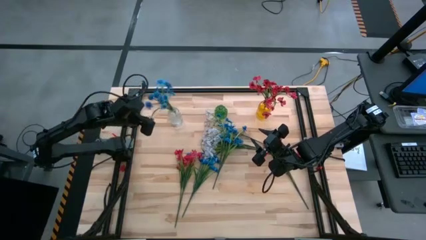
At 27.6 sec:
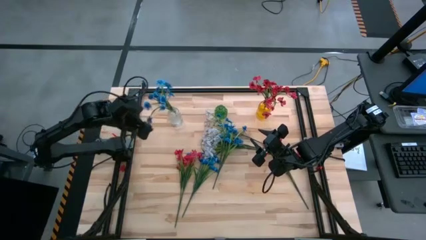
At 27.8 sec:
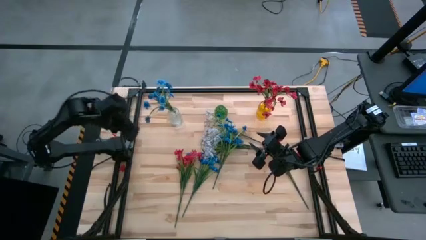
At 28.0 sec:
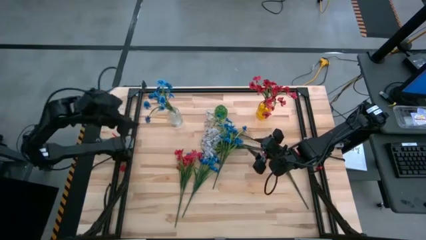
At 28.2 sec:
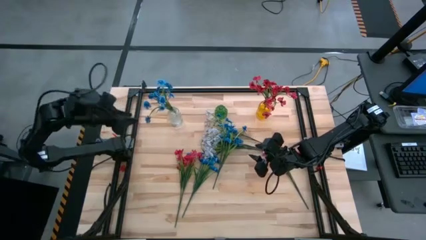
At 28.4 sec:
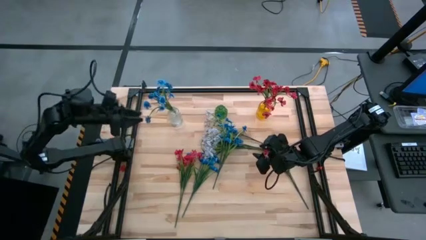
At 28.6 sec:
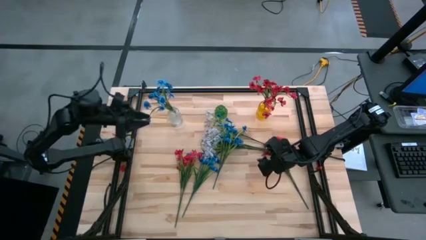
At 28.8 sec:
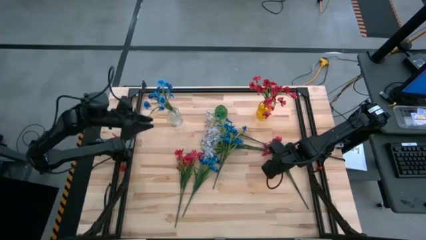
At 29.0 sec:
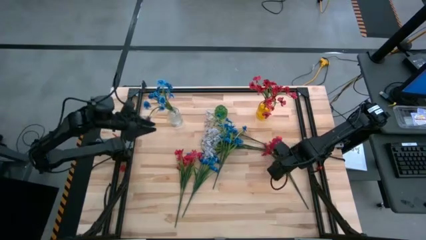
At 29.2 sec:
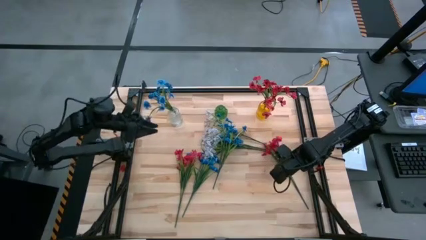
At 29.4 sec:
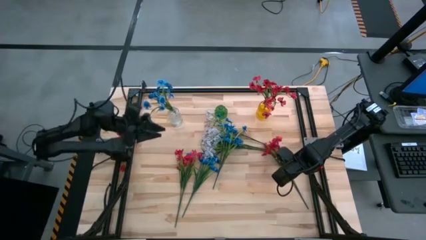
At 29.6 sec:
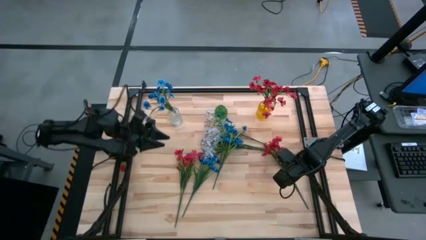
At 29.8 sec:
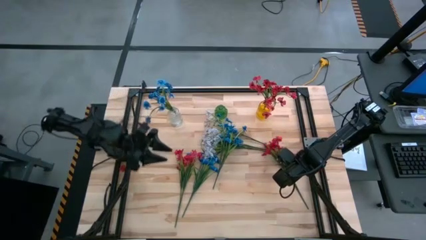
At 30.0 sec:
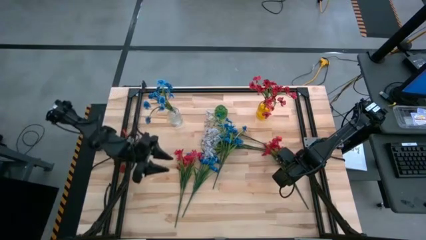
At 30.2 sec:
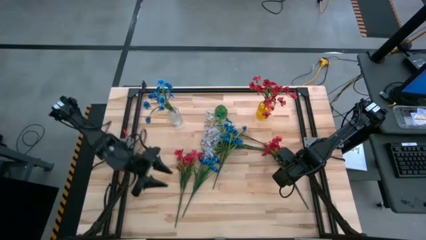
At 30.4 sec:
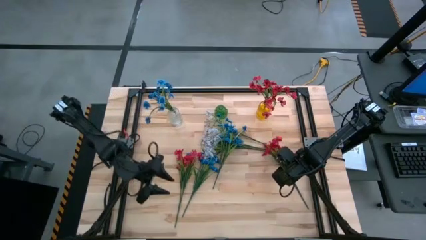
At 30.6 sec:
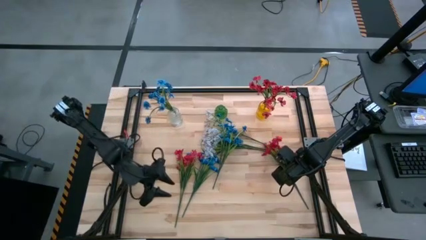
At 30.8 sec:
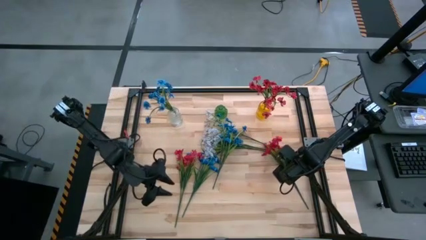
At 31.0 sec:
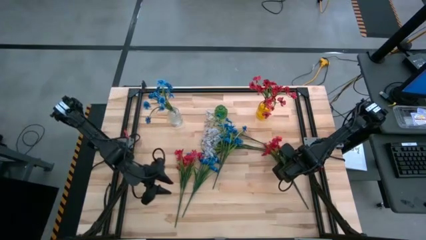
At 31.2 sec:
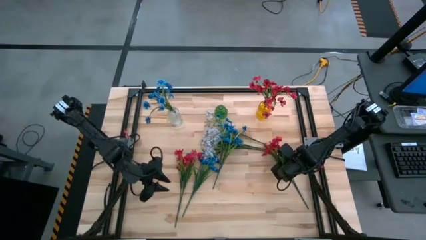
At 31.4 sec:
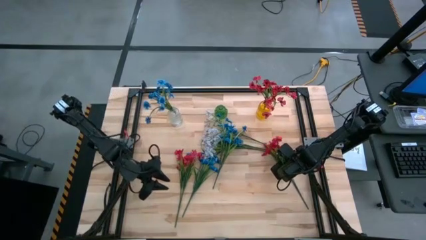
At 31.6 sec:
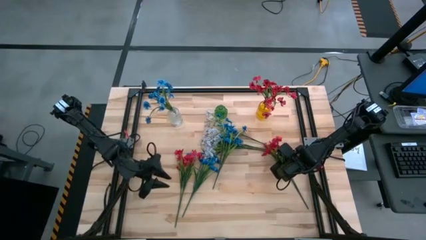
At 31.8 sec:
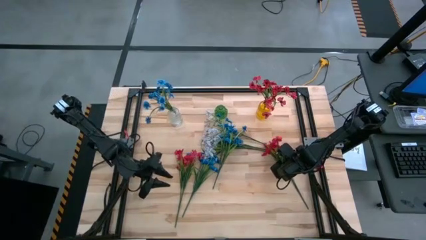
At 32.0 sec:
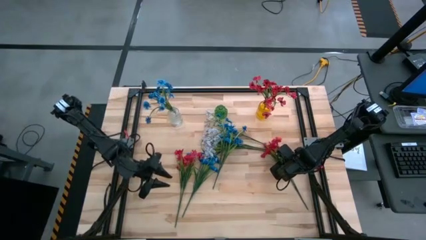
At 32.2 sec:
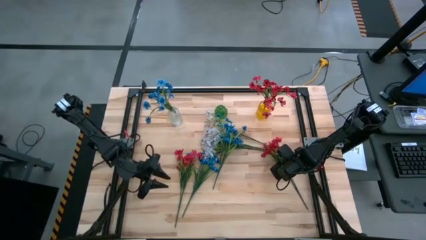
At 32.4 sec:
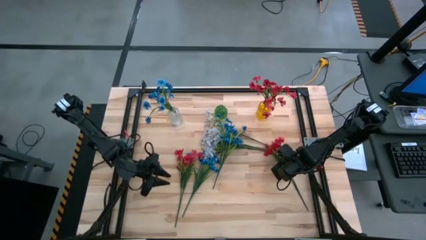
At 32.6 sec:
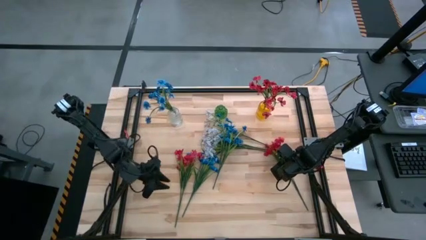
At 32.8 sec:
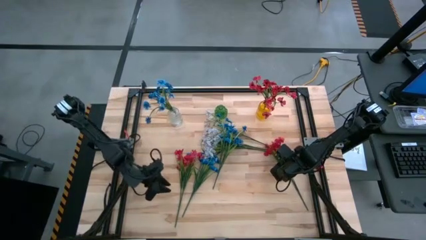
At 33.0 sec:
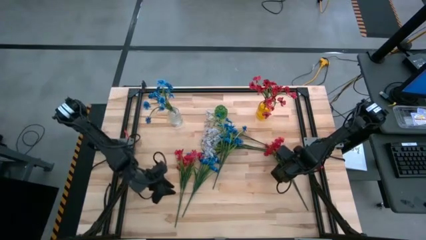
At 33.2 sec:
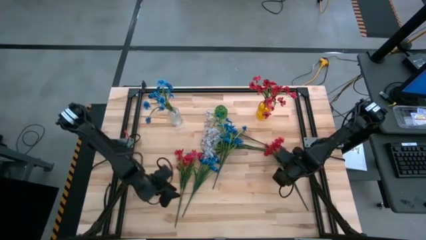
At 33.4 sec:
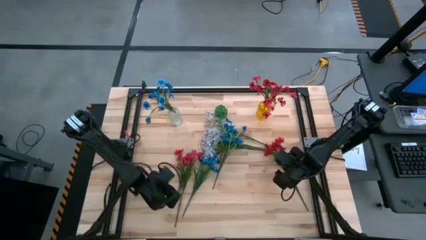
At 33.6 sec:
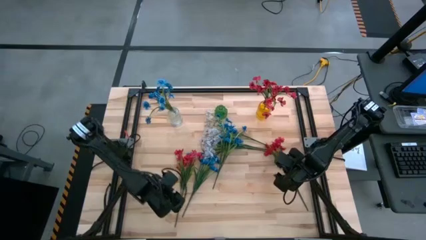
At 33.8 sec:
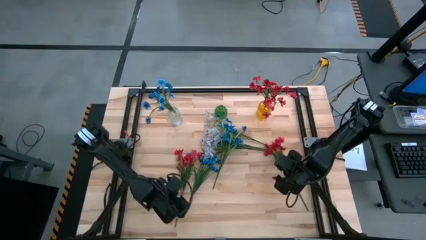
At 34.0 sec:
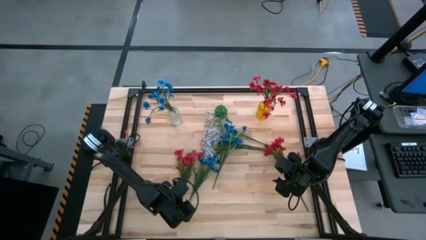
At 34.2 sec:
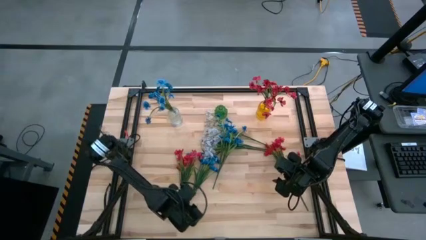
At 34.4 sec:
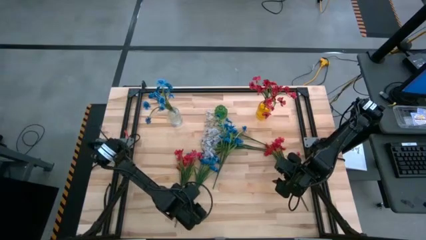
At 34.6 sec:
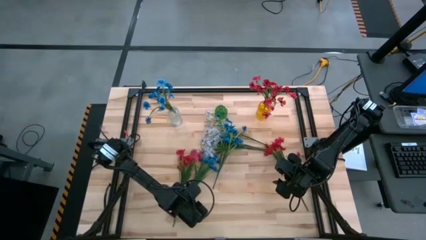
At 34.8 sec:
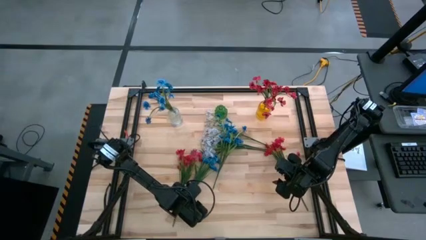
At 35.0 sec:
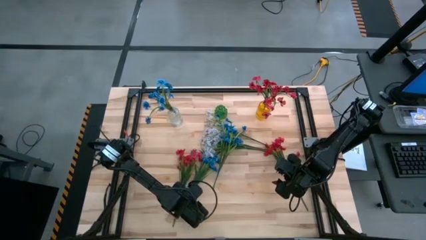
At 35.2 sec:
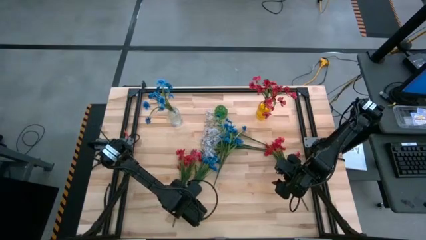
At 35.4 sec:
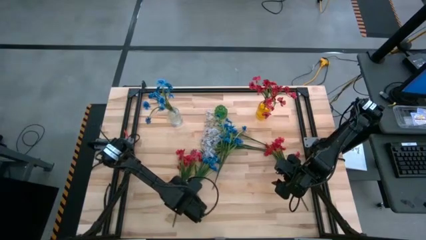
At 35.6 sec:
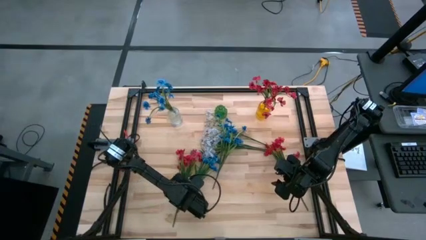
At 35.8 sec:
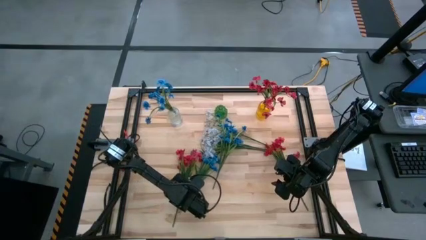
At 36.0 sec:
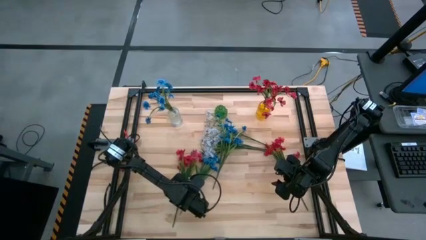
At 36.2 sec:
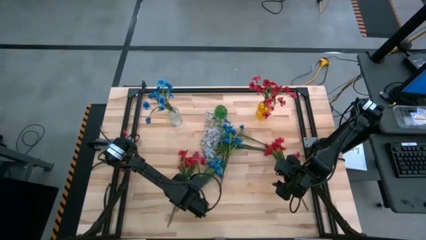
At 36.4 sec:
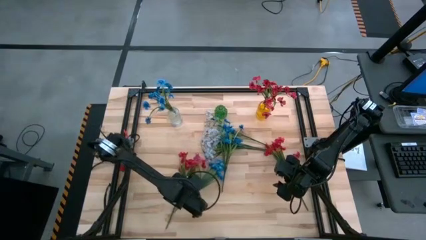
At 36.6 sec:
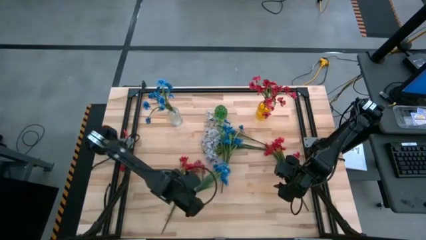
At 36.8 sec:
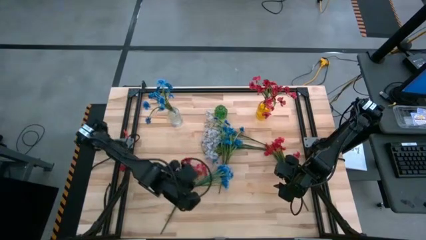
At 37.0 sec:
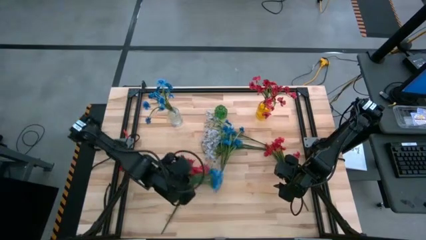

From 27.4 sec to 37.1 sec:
Task: Sort flowers into vase by color
Put the blue flowers into the transparent vase

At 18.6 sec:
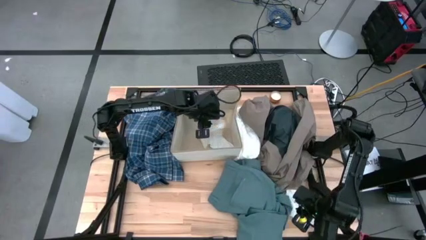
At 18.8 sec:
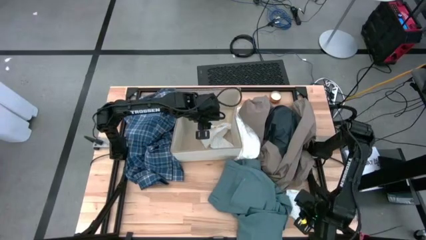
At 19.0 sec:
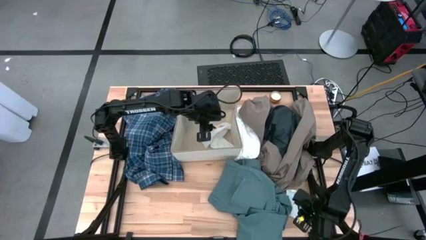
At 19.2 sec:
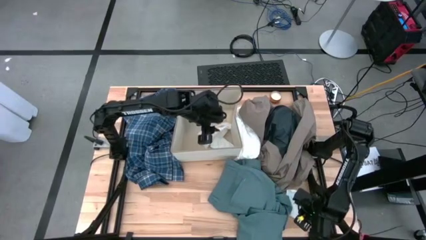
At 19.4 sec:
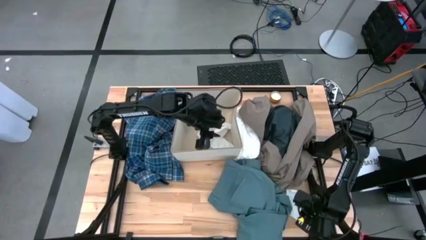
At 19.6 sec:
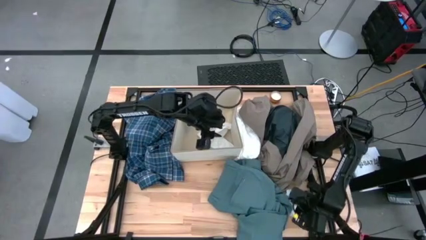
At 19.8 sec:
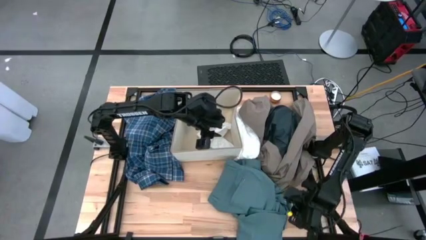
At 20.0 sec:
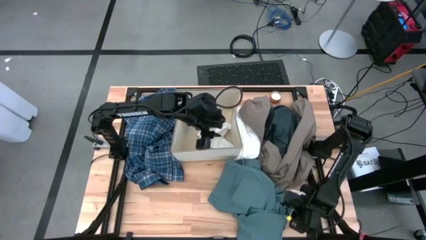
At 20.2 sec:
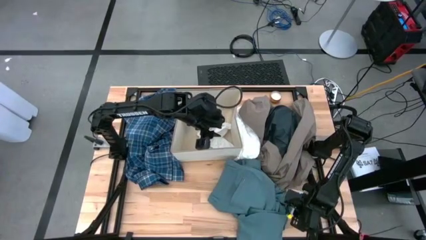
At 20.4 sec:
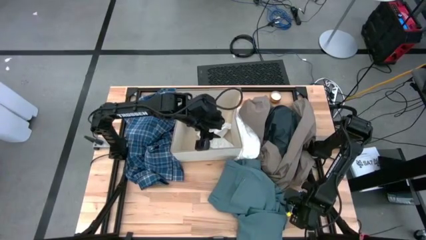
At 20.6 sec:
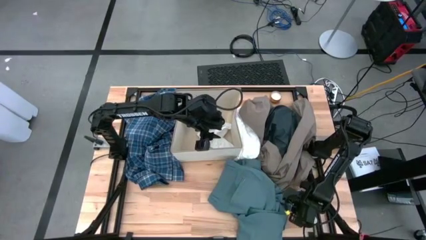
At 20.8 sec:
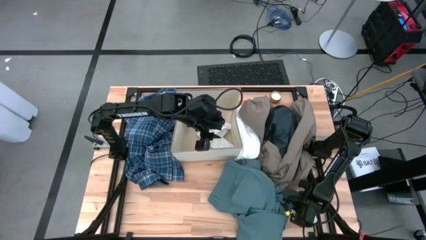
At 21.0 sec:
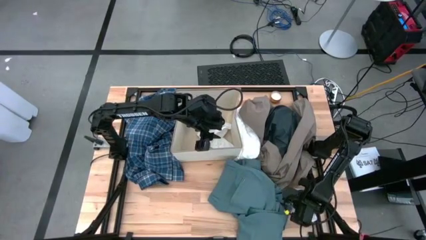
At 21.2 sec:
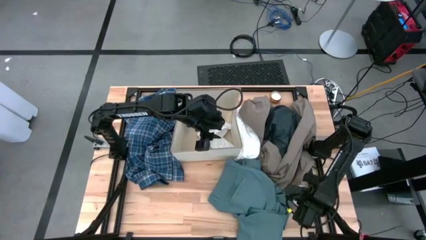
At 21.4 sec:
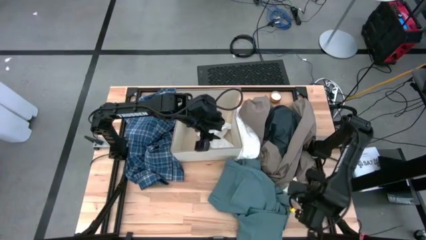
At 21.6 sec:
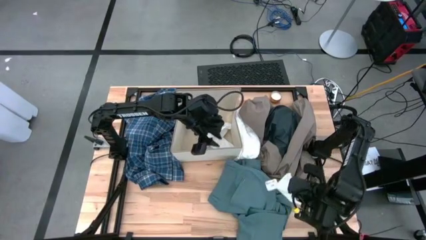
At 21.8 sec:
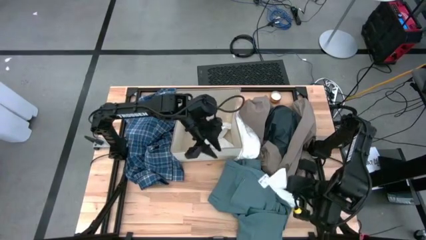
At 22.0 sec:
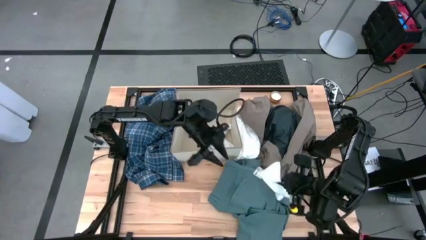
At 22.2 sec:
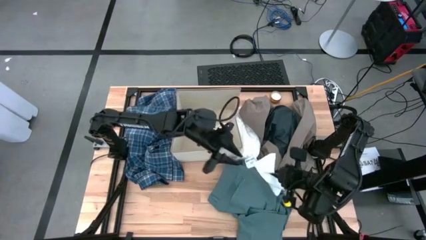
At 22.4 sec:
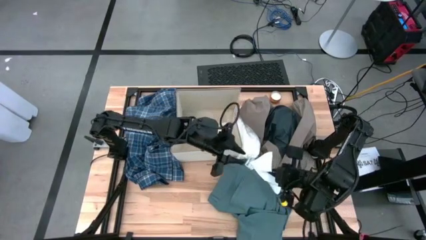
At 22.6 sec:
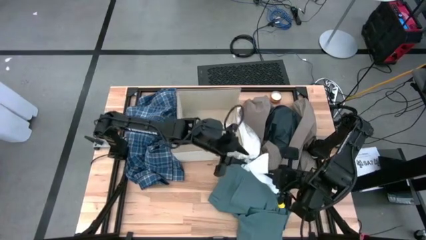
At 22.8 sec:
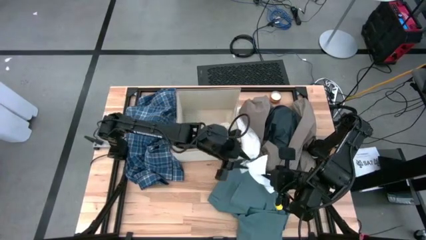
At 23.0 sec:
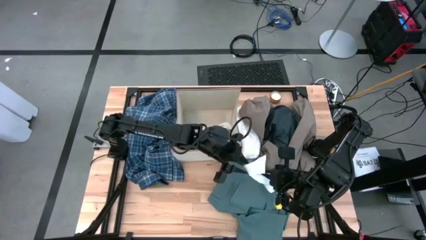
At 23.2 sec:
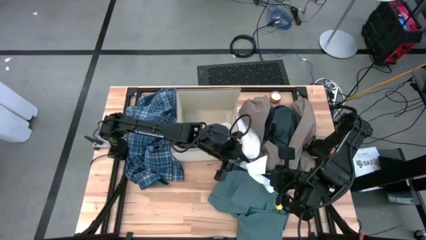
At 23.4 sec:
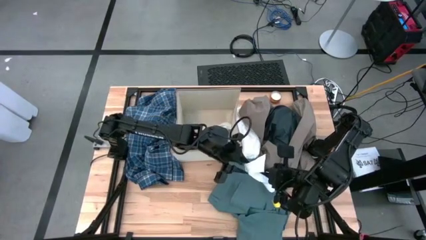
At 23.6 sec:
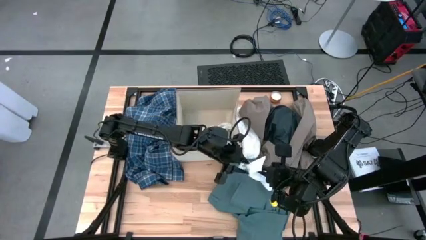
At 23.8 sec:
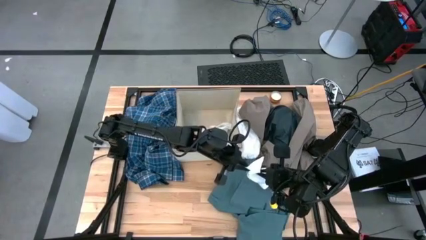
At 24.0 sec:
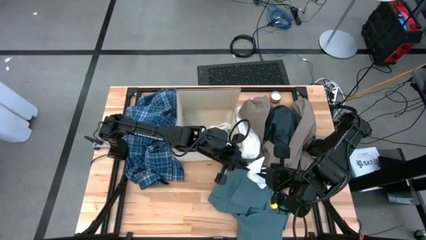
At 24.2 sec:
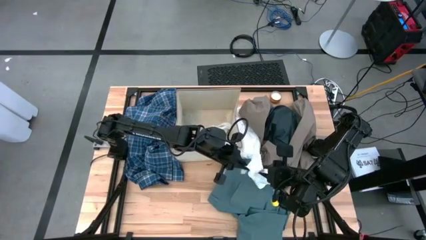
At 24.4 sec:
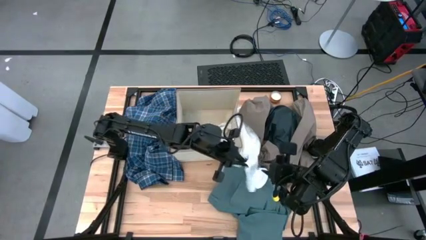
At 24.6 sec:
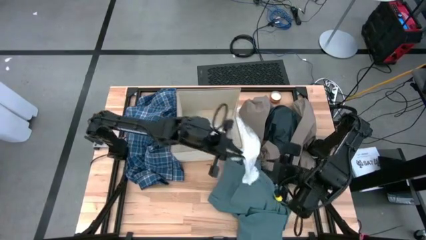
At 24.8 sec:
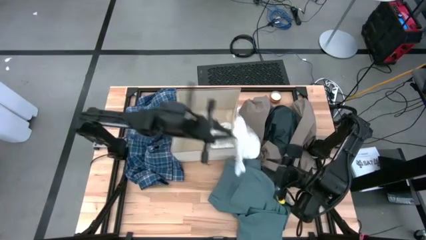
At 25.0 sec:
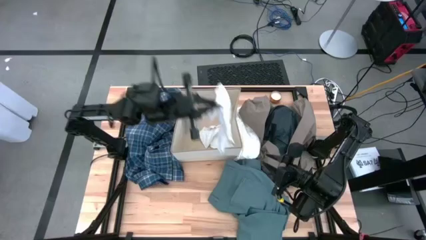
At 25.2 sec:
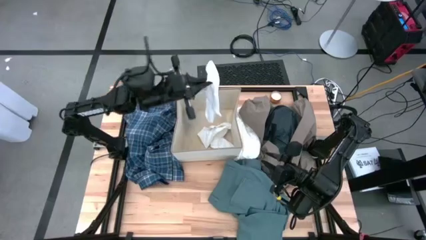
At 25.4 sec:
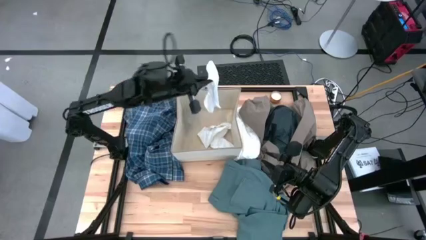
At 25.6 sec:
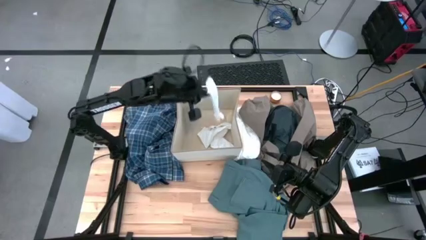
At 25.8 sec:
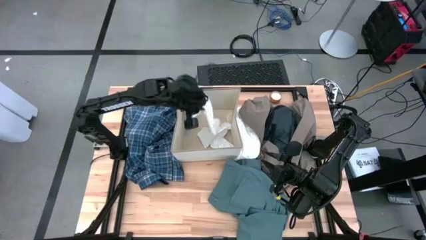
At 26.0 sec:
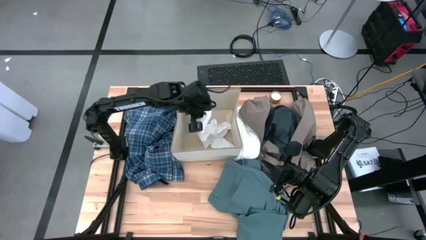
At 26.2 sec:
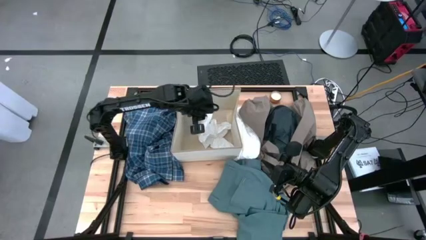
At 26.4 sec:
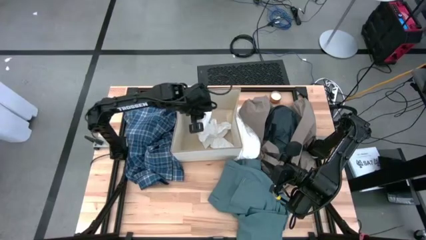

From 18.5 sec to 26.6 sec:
Task: Sort clothes
Put the white sock into the laundry organizer
